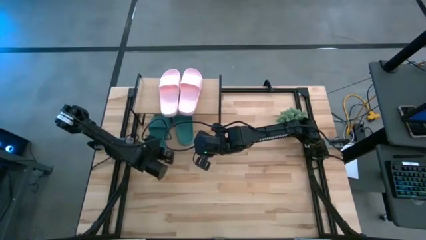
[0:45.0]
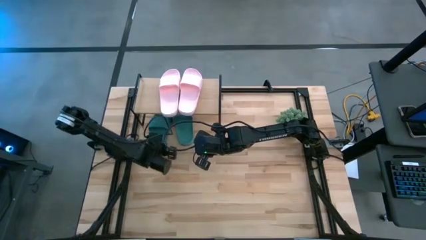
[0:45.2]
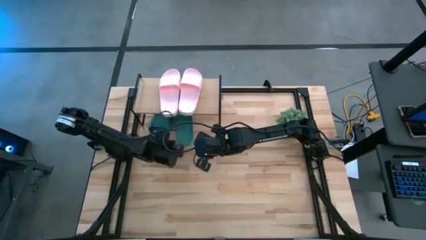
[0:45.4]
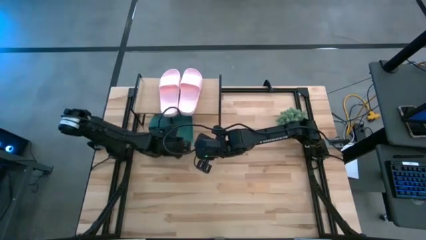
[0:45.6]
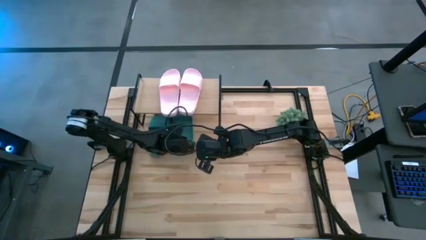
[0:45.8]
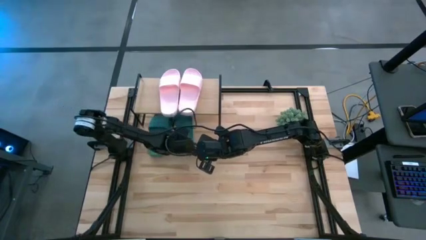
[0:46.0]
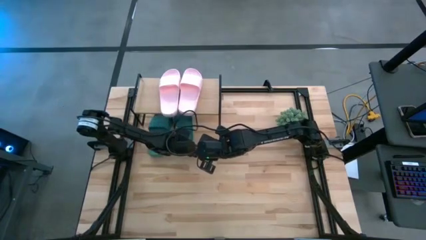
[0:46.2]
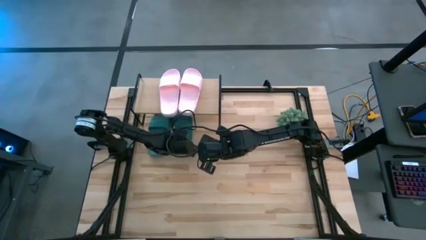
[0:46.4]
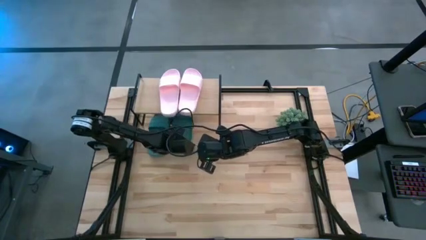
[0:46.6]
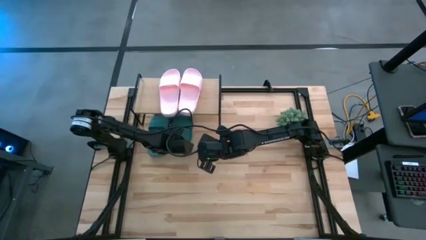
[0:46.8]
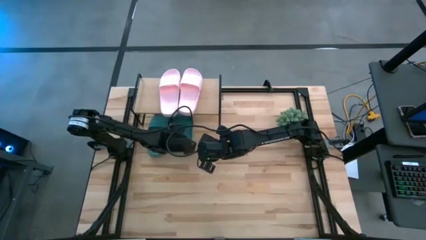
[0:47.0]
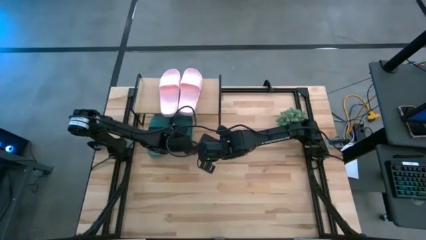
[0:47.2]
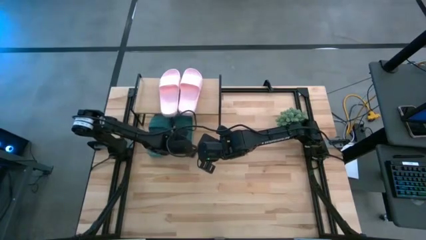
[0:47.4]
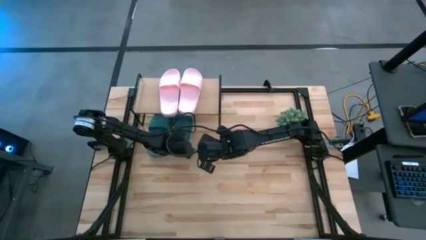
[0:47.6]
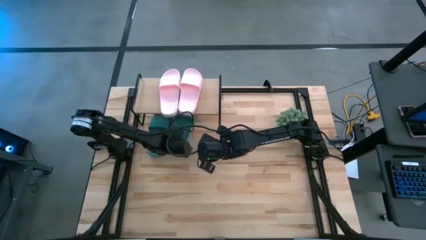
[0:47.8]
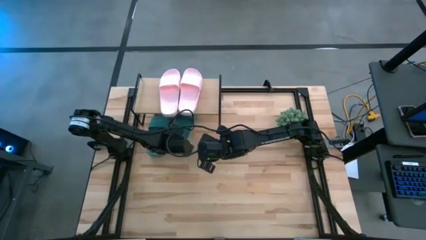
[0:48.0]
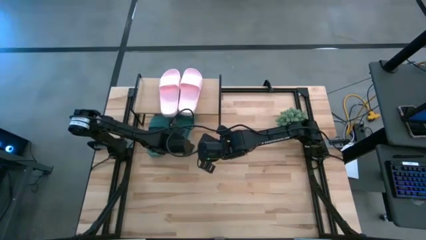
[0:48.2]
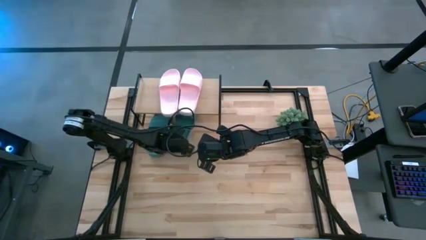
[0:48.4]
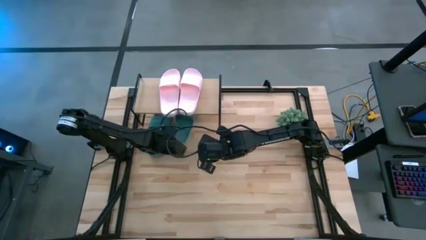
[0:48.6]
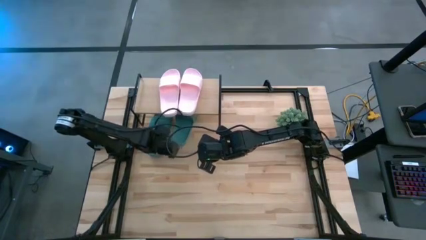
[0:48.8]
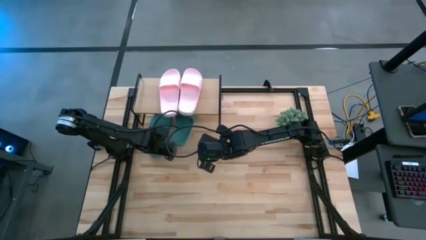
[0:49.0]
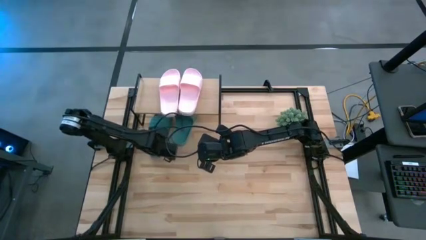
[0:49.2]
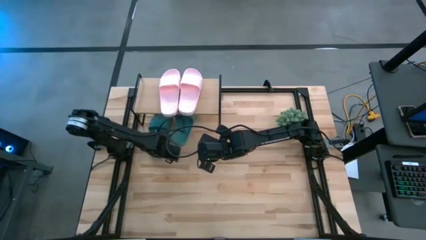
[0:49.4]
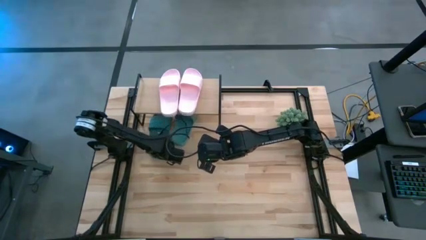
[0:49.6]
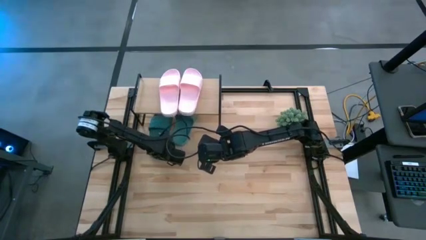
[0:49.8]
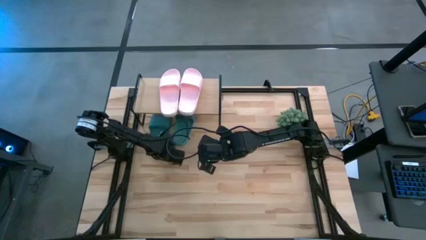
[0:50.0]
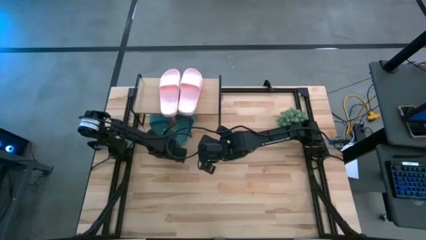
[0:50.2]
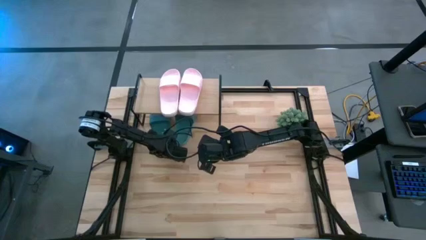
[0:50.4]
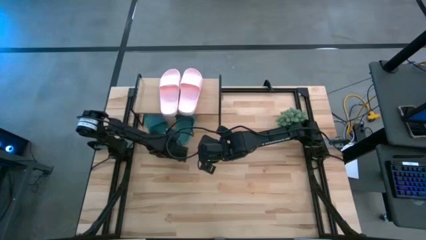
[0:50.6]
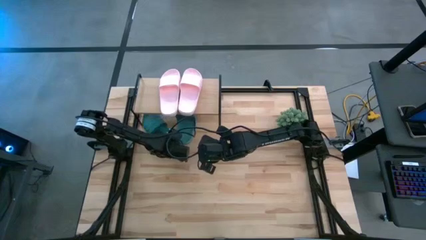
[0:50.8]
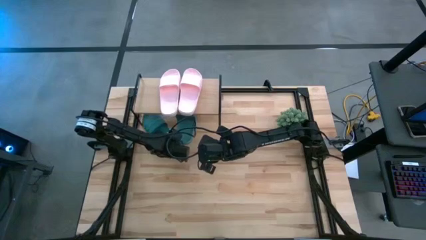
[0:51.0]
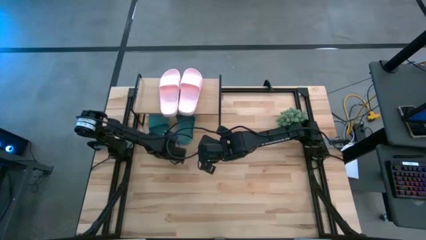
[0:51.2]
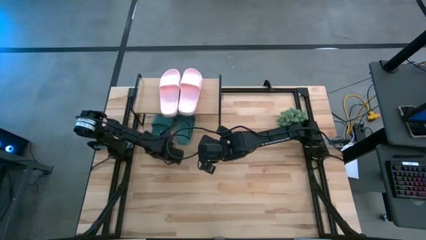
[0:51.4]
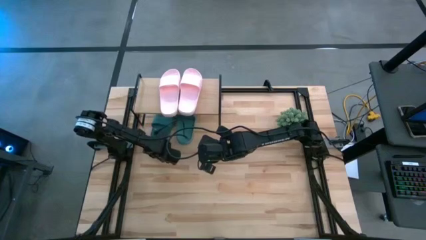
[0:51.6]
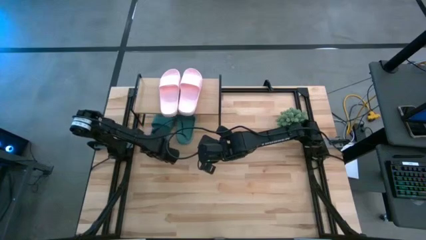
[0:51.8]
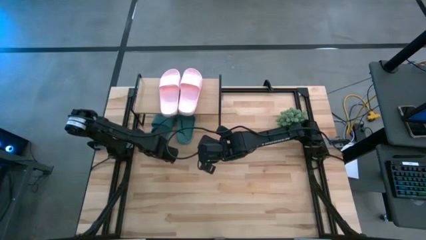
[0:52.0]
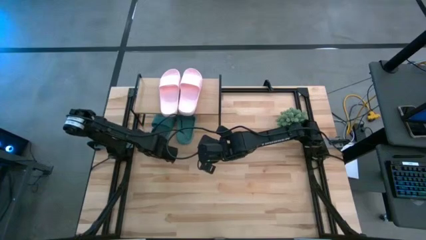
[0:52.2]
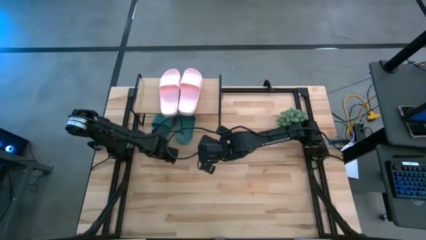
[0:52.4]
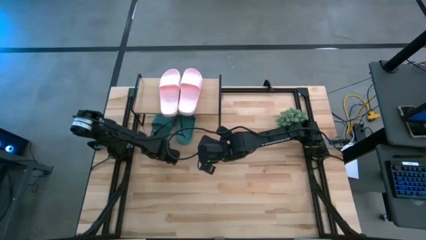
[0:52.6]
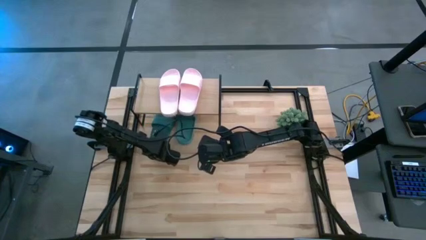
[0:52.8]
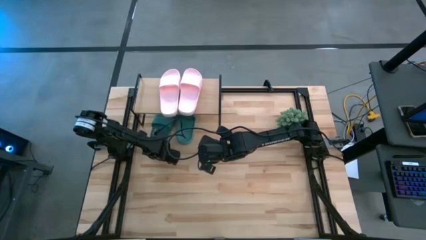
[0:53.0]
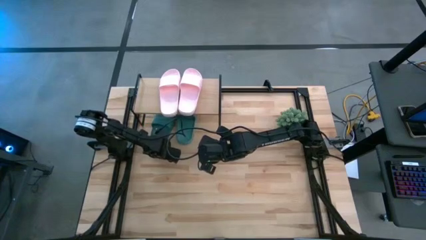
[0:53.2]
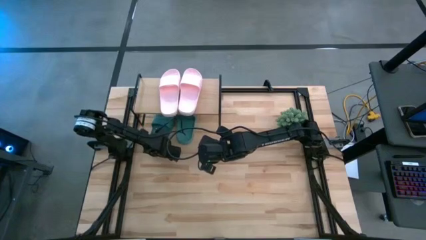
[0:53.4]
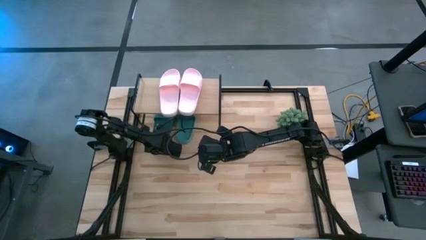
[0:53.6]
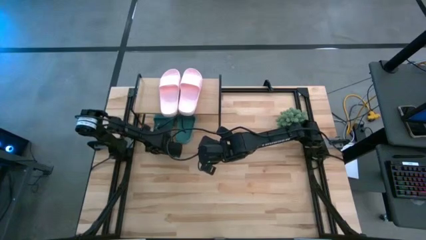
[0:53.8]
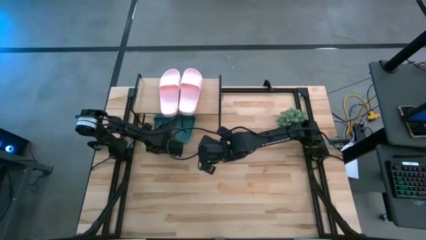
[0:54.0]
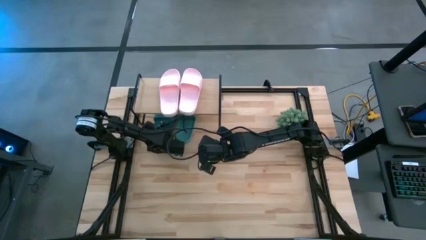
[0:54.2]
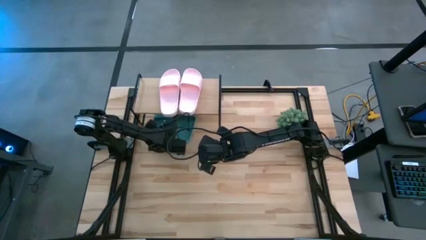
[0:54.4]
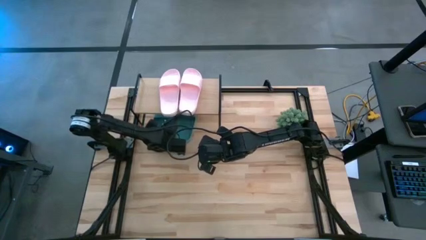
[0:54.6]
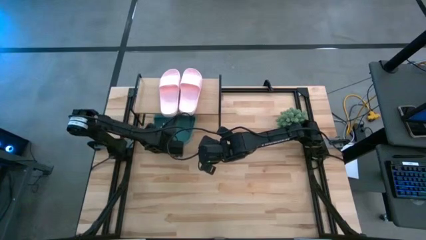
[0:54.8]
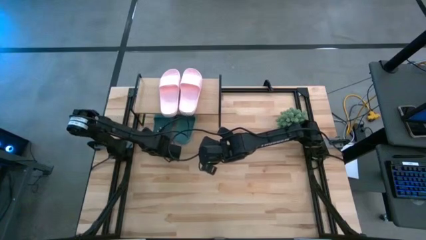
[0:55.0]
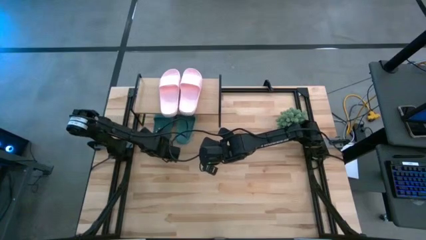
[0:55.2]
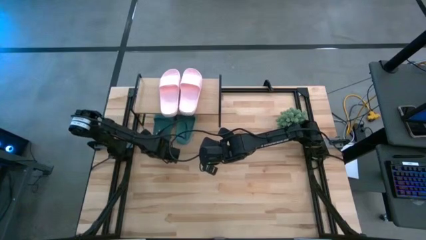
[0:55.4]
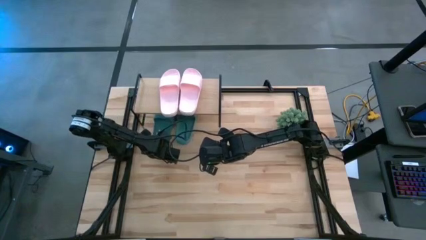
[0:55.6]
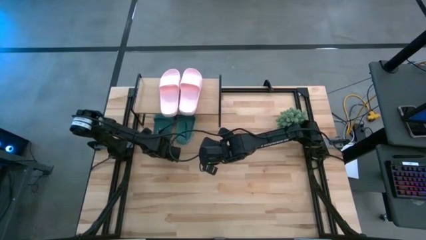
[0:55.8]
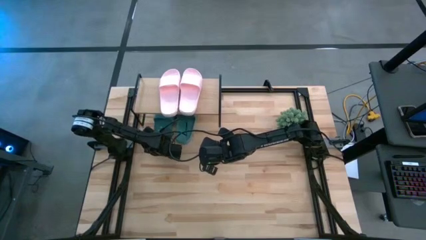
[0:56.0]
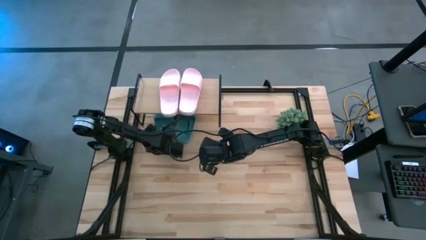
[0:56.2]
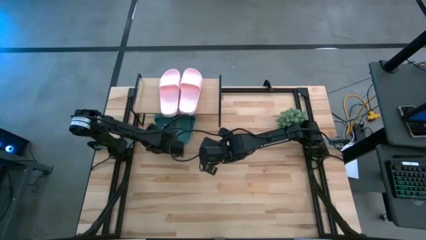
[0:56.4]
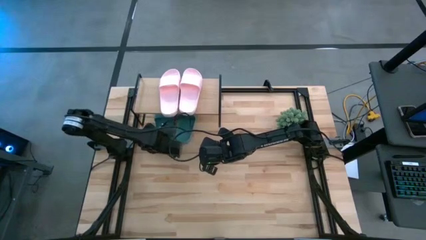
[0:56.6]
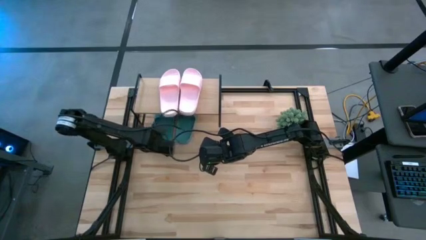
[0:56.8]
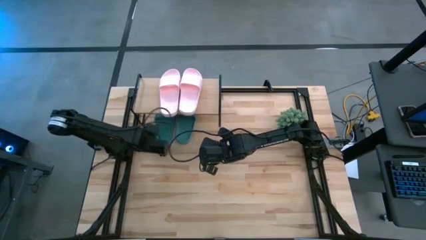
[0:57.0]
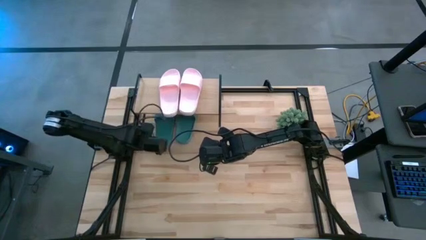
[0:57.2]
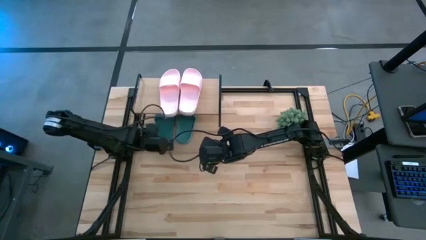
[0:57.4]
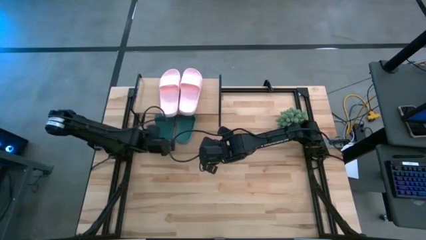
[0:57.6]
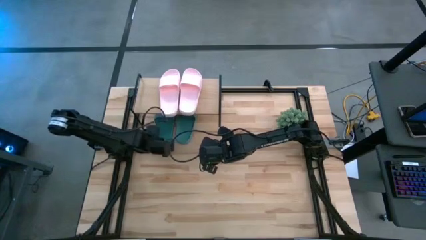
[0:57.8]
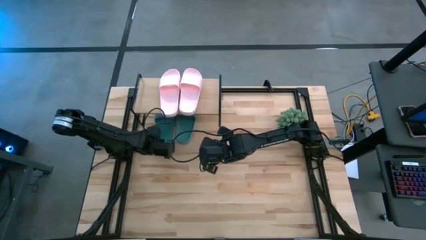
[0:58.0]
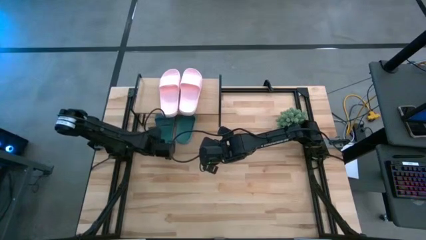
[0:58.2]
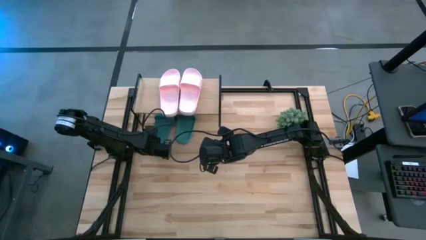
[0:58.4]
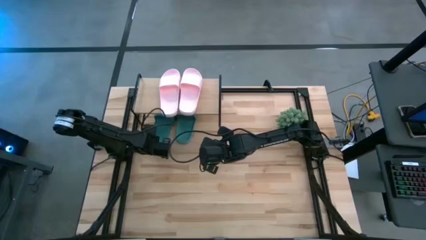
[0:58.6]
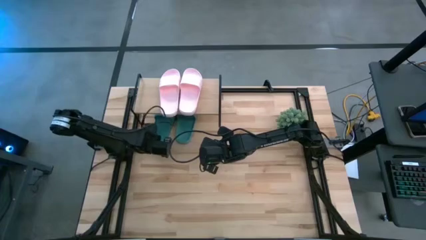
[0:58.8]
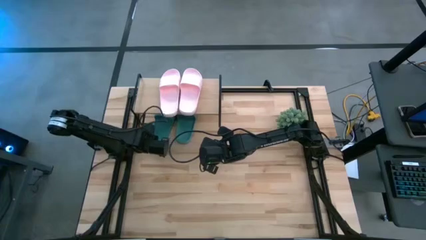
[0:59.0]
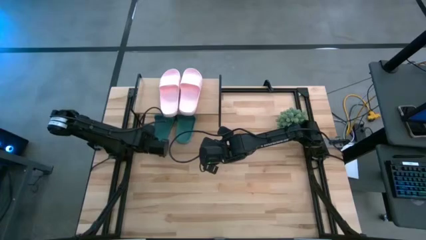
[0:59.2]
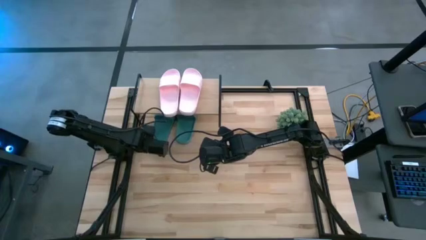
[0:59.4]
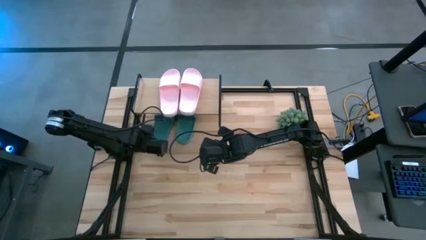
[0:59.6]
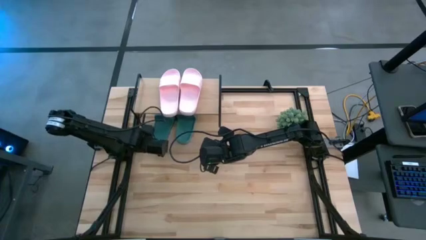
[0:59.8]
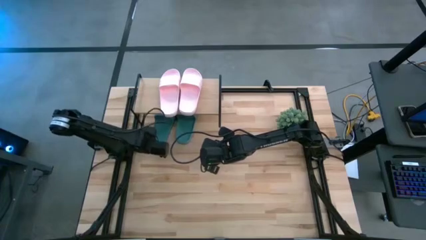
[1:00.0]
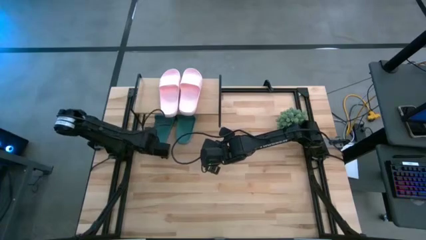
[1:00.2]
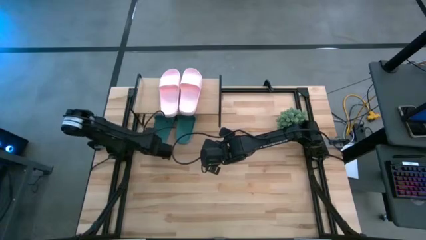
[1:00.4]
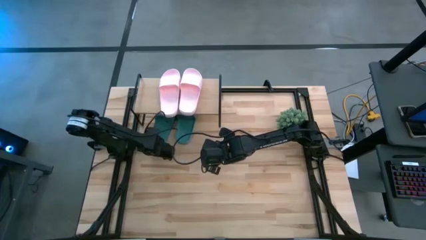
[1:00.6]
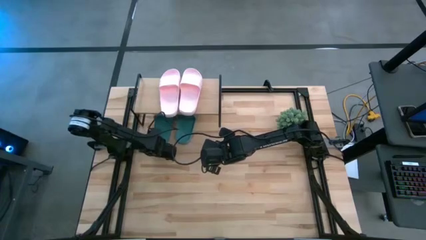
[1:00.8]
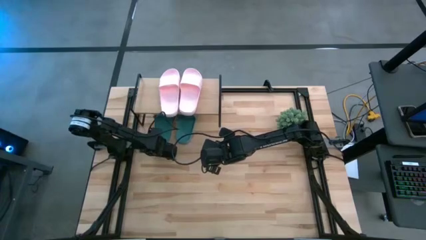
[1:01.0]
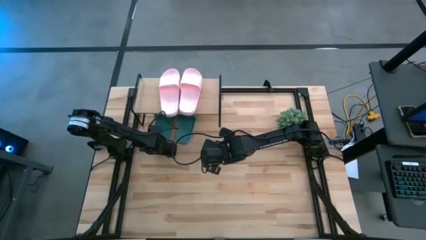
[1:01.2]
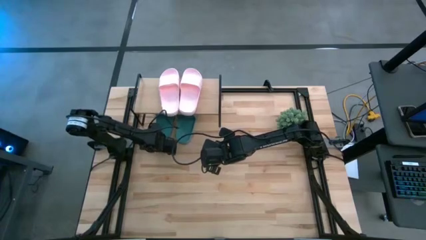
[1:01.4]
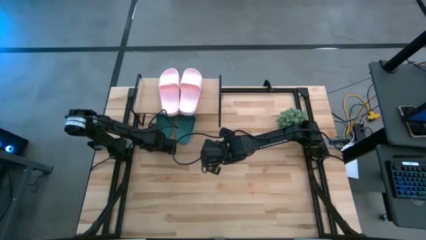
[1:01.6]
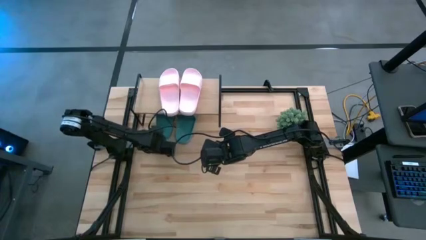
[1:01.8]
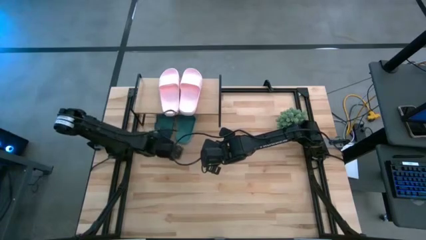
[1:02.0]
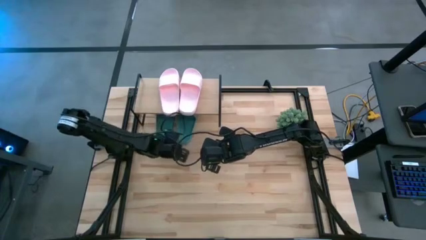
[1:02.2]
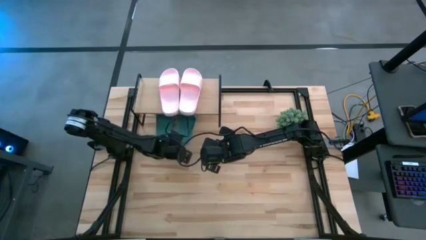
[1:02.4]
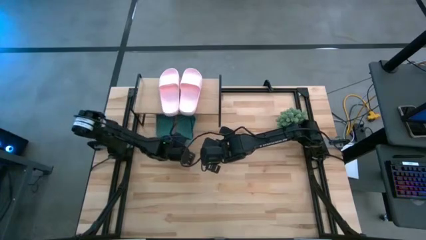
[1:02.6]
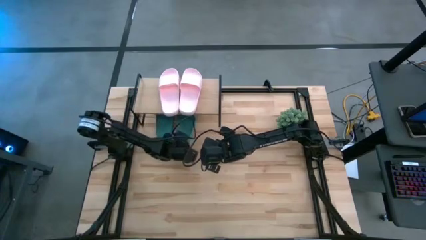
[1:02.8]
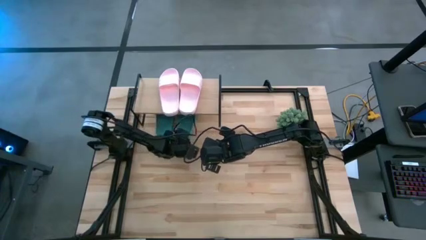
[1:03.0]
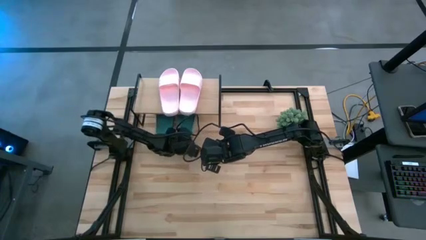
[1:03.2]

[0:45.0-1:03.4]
Task: Pick and place slides into the shelf
Adjust the green slippers
